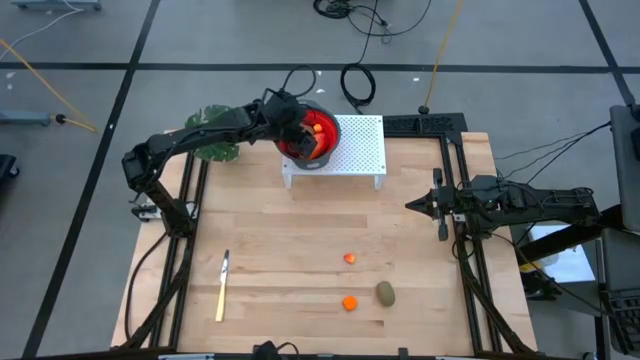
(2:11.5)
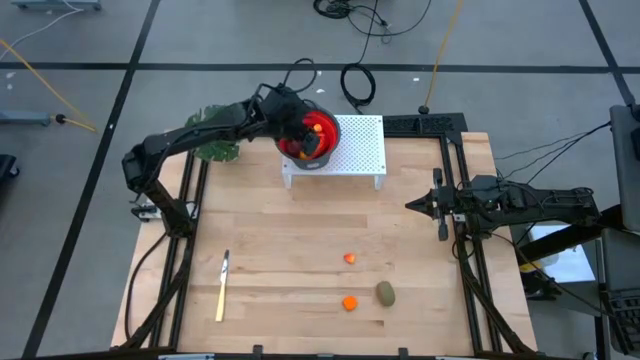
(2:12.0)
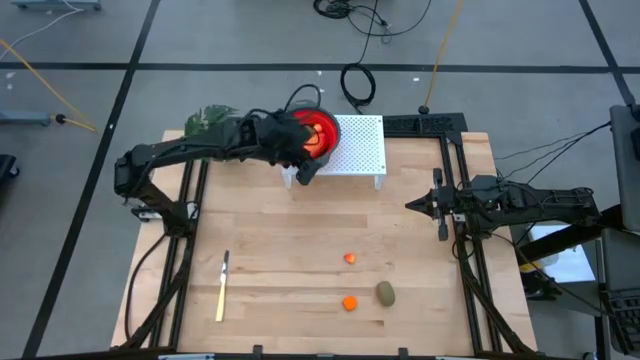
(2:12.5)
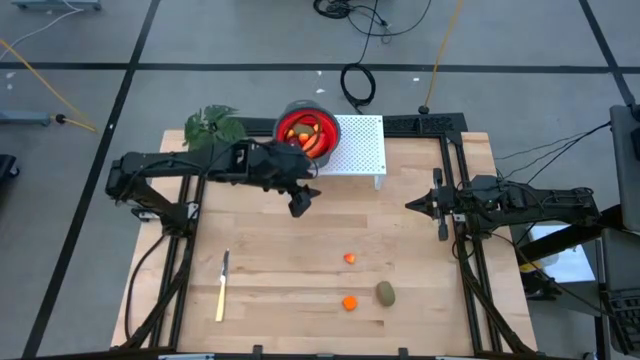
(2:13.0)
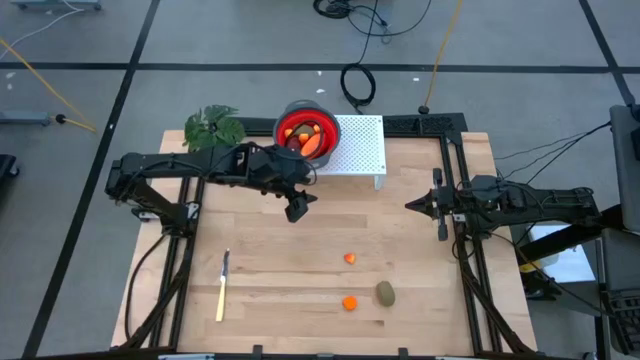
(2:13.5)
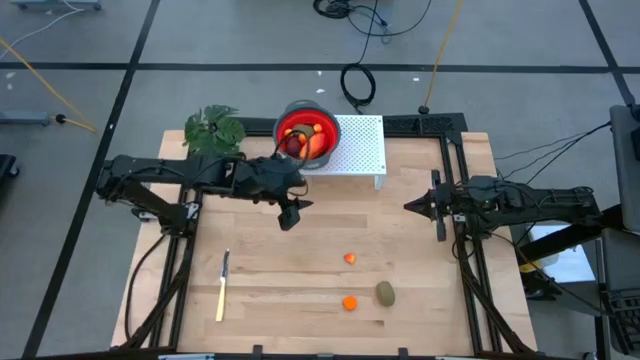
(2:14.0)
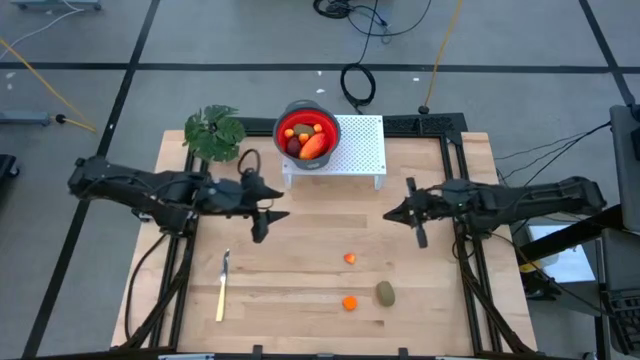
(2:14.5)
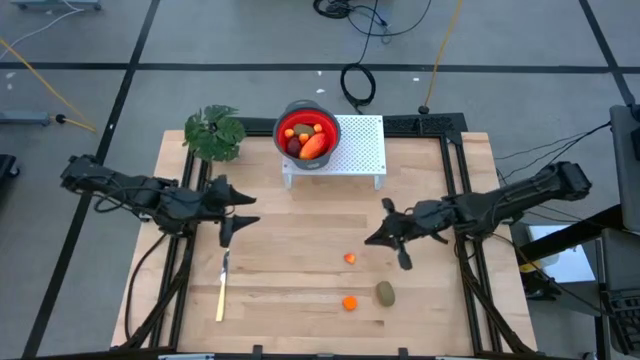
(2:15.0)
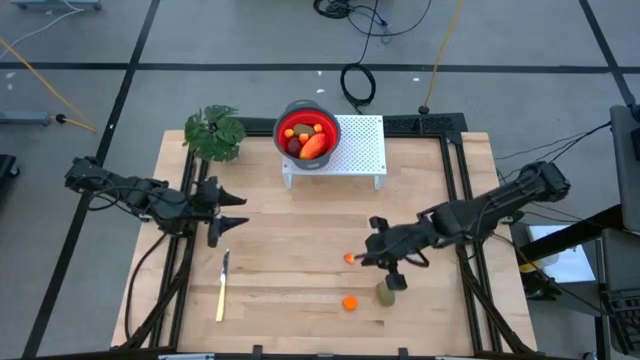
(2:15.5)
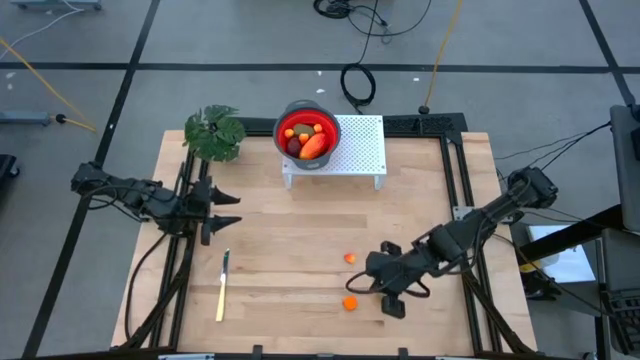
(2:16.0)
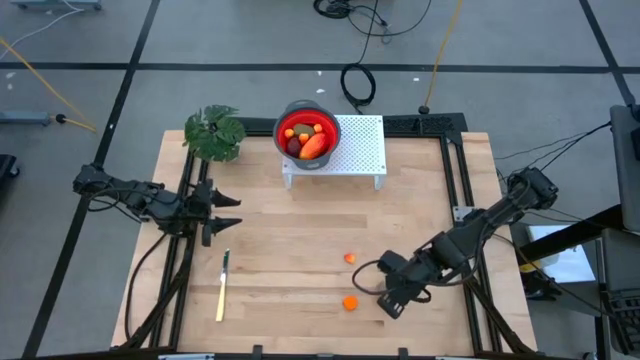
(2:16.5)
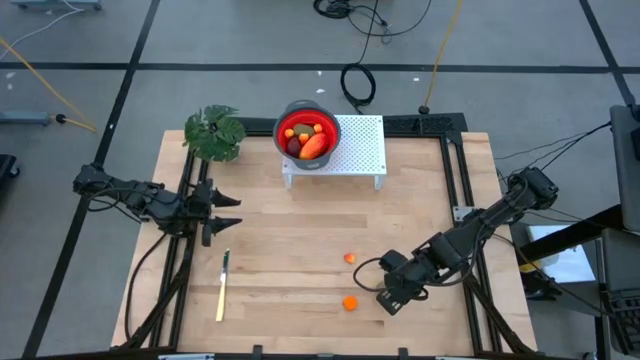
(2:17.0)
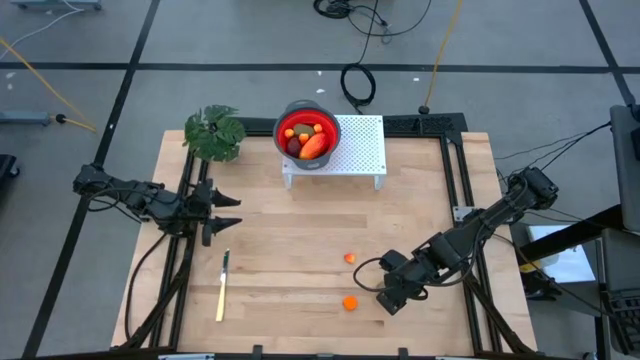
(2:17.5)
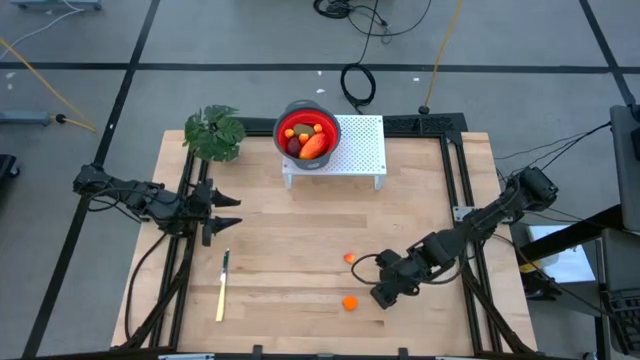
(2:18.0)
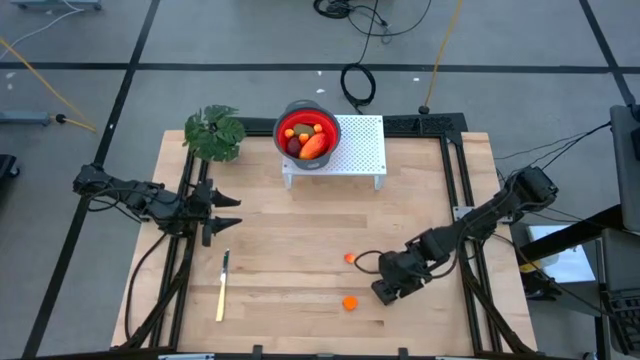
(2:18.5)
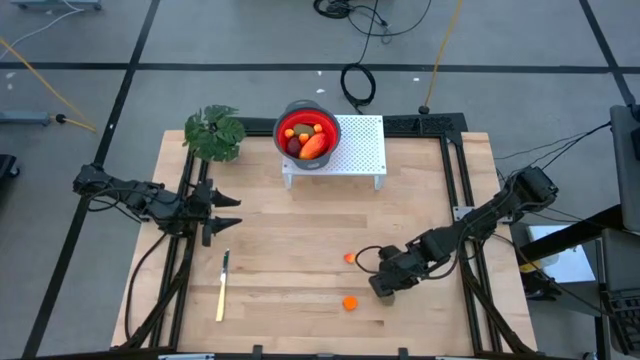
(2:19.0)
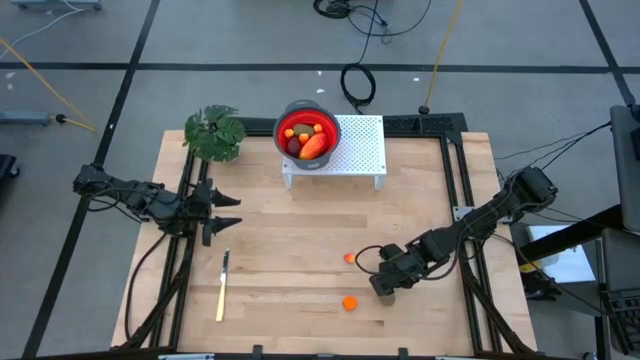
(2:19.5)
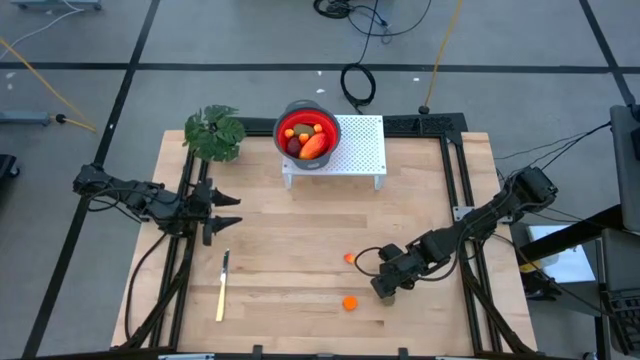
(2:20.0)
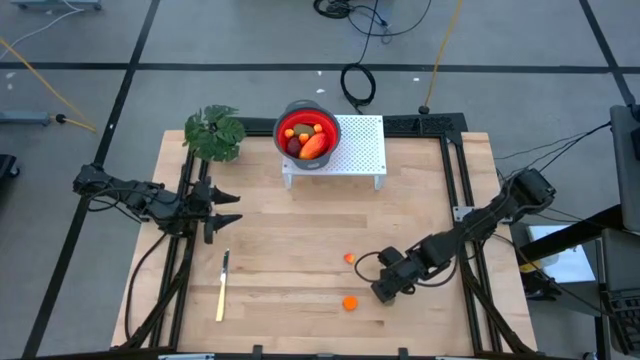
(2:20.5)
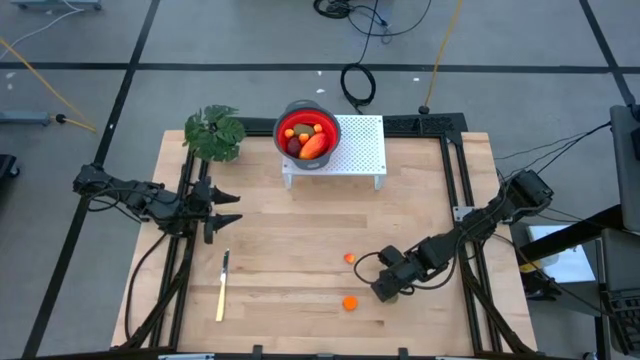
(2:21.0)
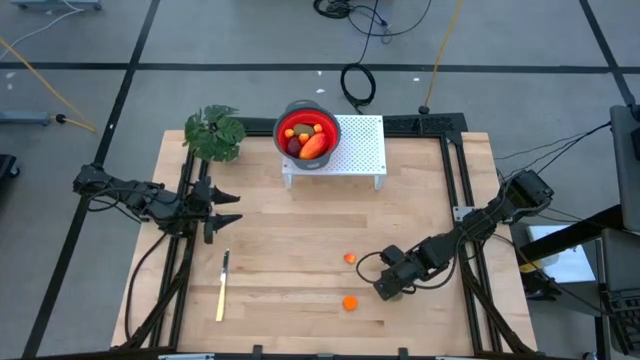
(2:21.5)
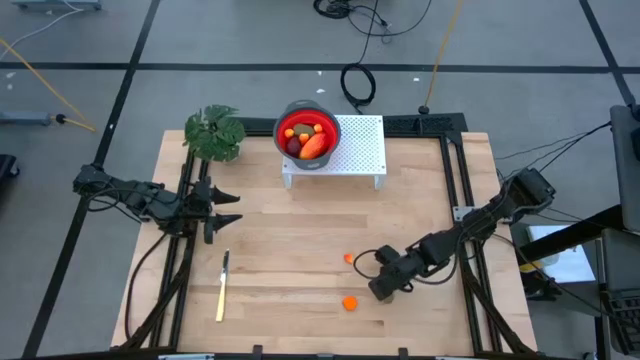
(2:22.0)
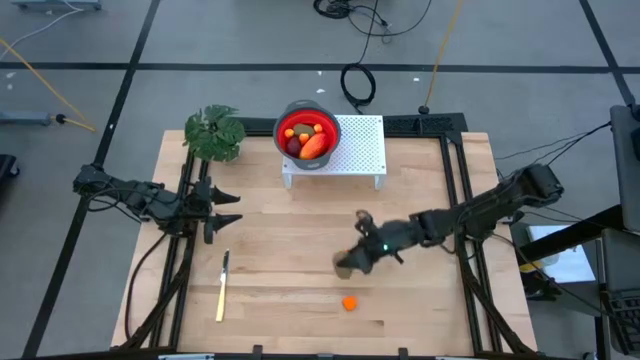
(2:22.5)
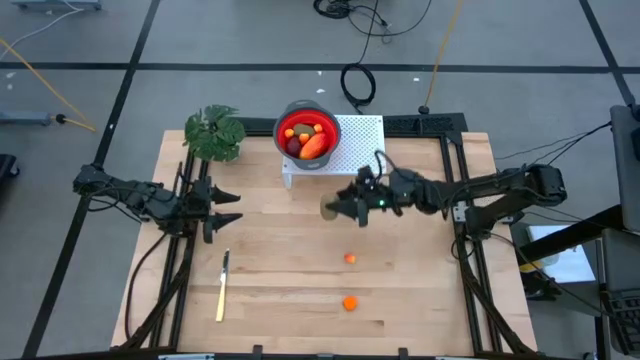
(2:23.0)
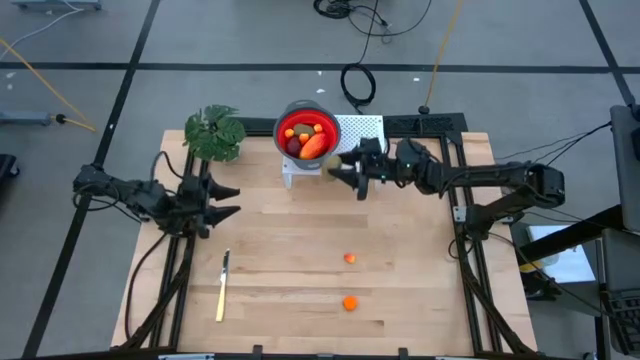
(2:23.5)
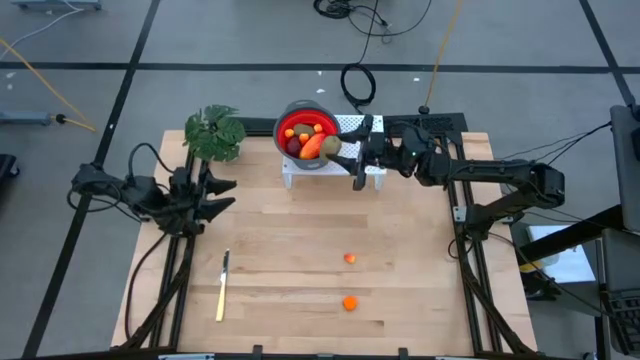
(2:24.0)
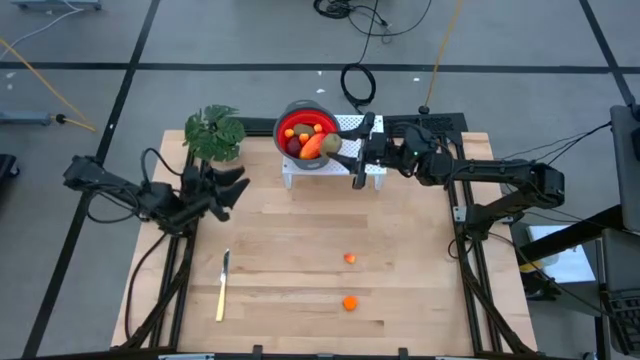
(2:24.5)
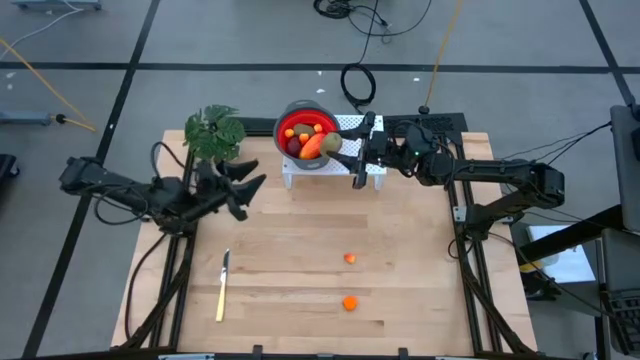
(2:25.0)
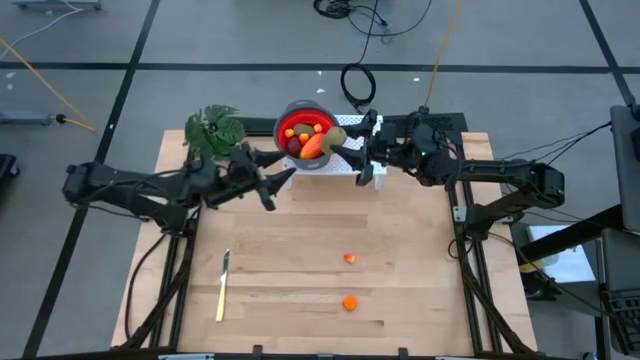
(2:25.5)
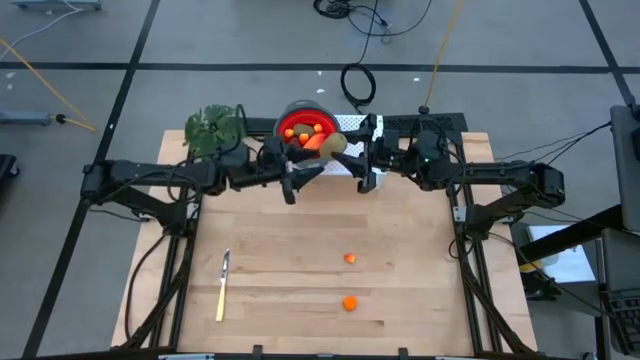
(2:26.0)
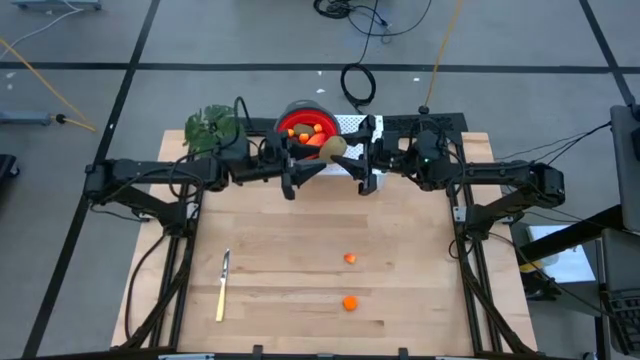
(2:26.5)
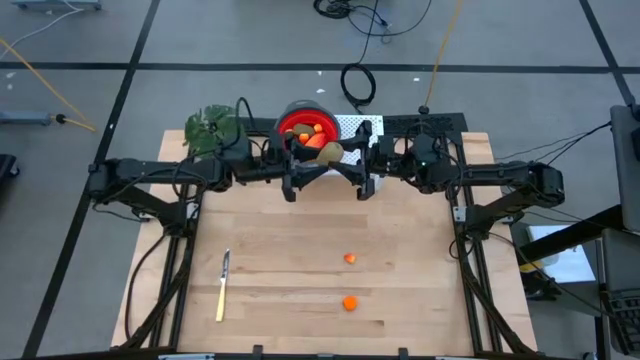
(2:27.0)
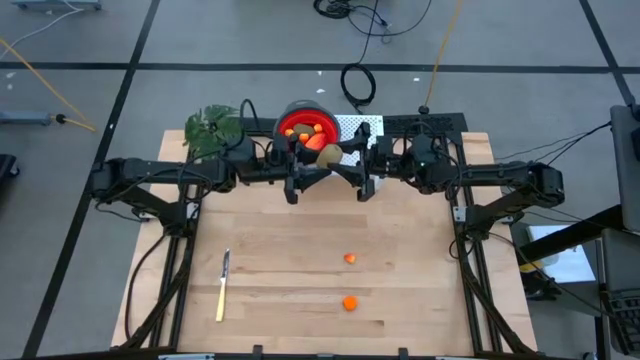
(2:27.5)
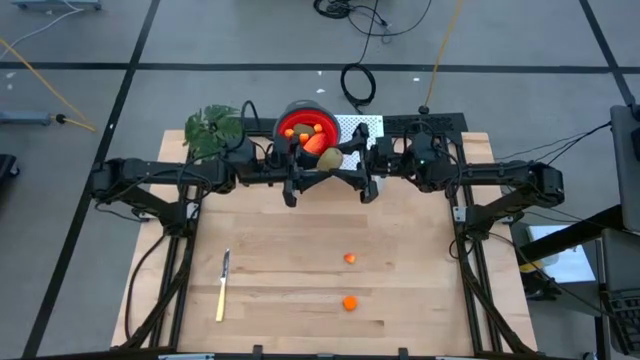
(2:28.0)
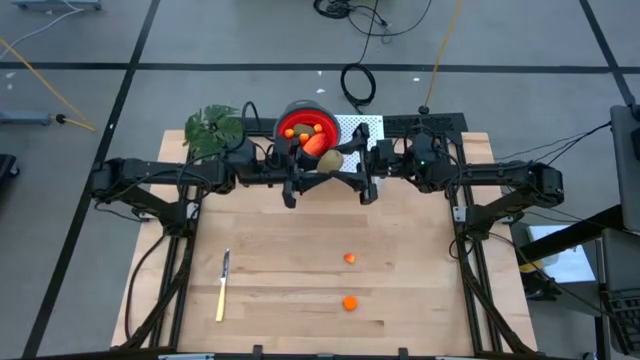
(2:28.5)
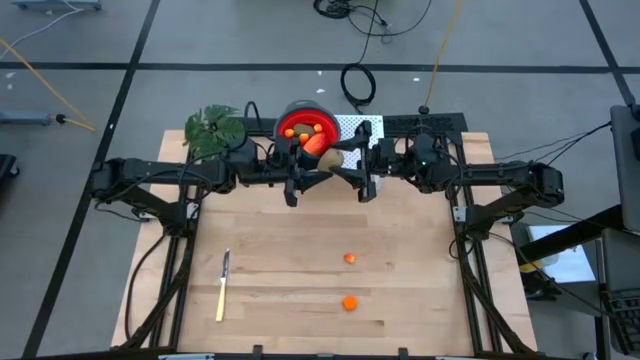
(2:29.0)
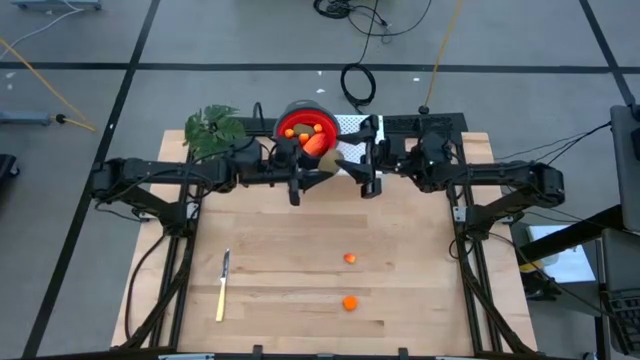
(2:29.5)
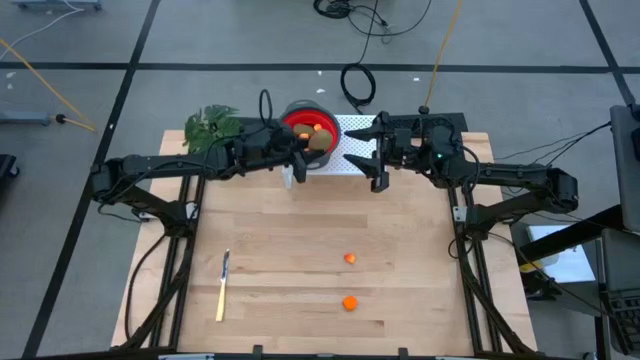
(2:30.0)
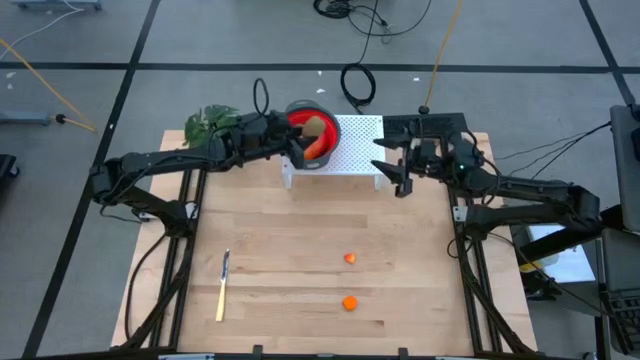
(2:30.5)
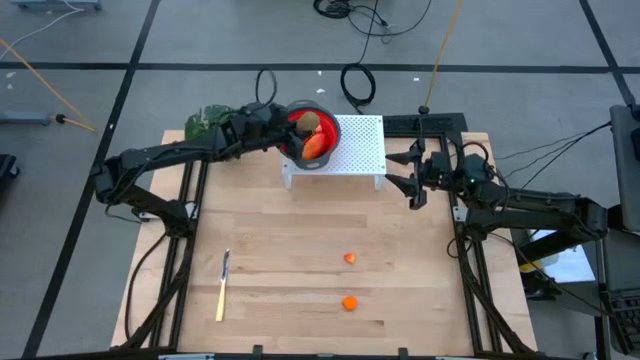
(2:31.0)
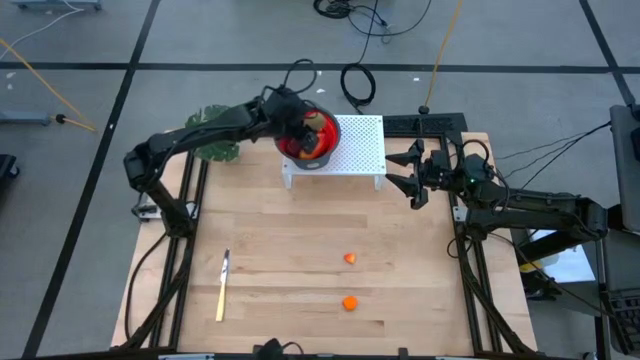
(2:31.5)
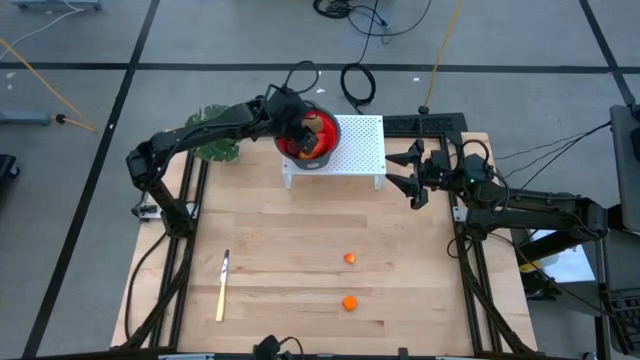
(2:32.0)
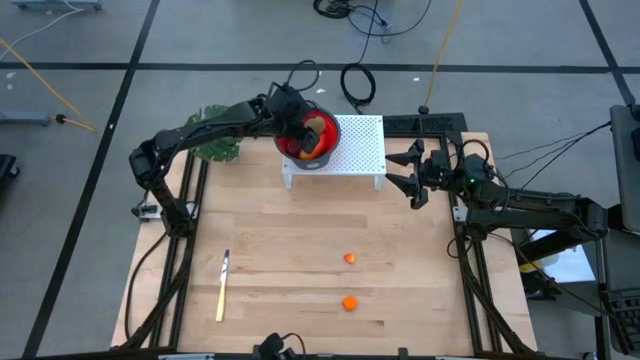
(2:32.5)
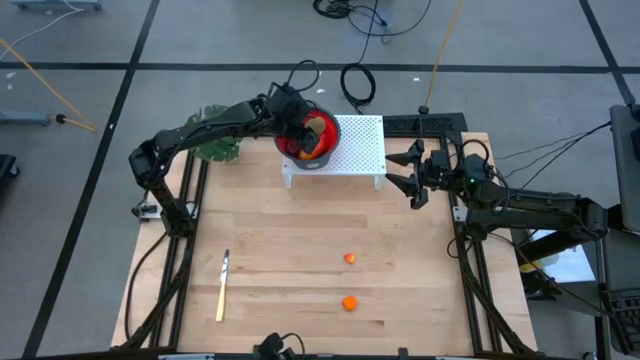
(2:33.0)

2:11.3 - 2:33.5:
Task: Pick & Place Fruit
Put the kiwi into the red strainer bowl on the shelf
